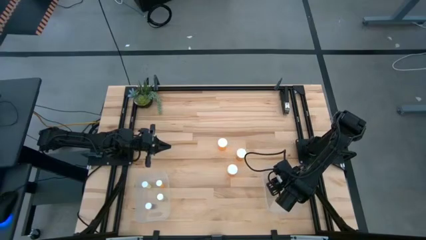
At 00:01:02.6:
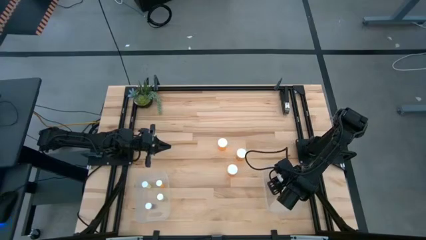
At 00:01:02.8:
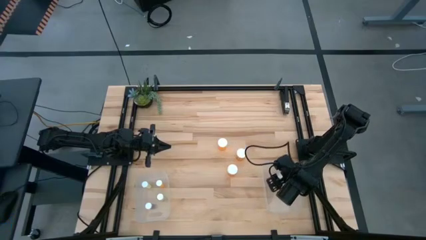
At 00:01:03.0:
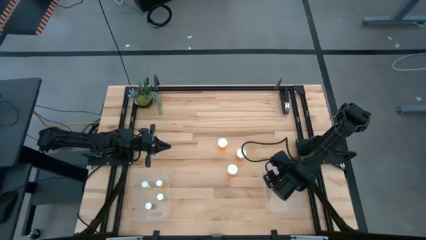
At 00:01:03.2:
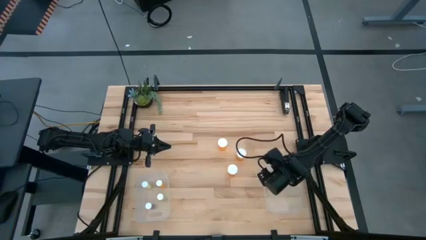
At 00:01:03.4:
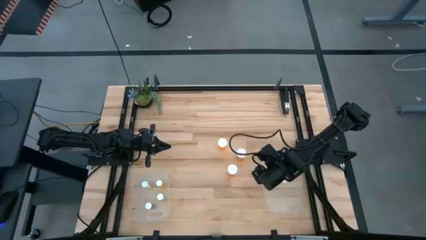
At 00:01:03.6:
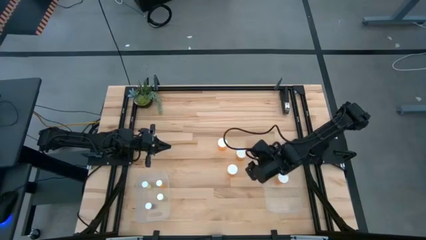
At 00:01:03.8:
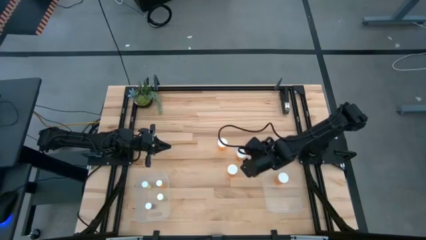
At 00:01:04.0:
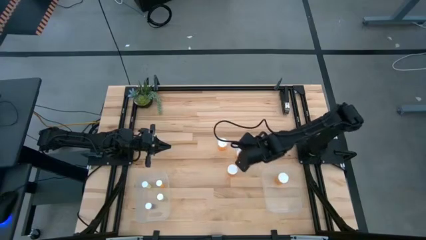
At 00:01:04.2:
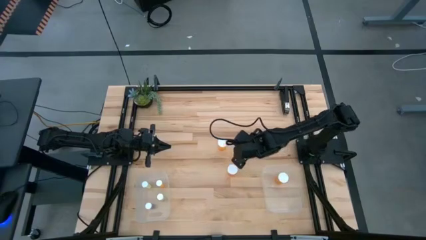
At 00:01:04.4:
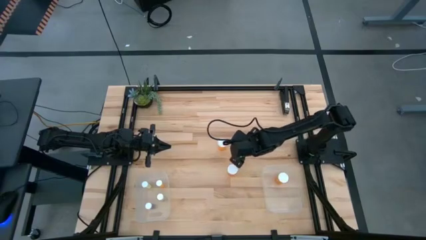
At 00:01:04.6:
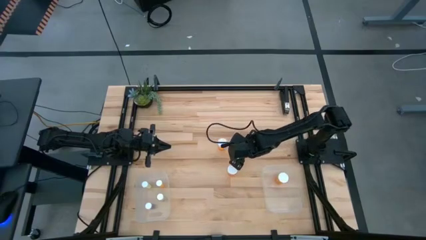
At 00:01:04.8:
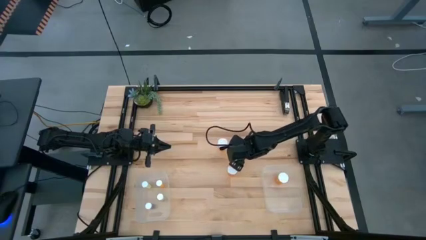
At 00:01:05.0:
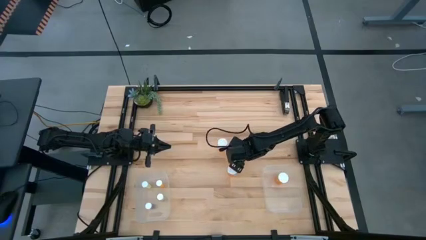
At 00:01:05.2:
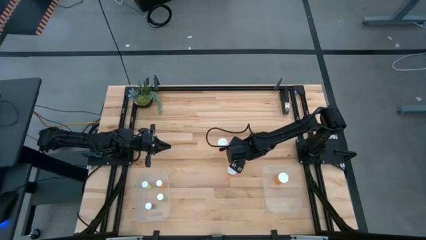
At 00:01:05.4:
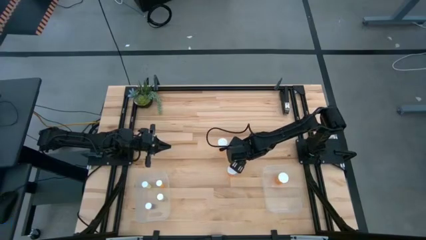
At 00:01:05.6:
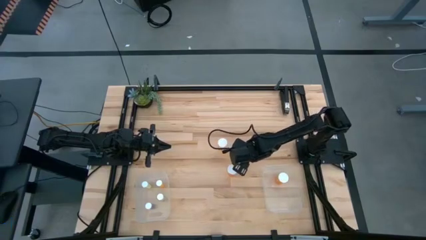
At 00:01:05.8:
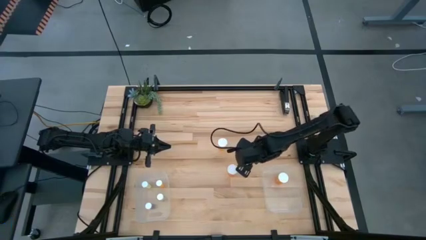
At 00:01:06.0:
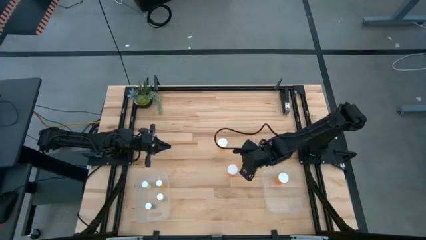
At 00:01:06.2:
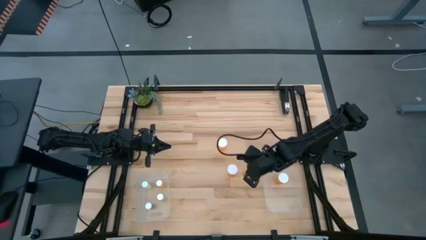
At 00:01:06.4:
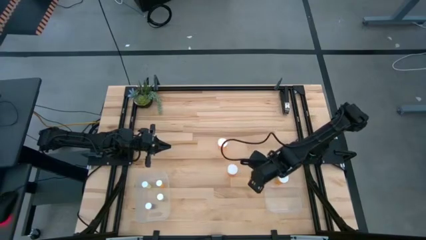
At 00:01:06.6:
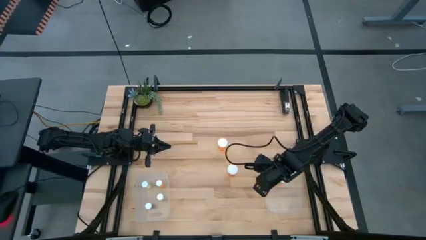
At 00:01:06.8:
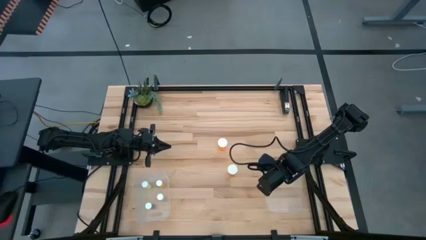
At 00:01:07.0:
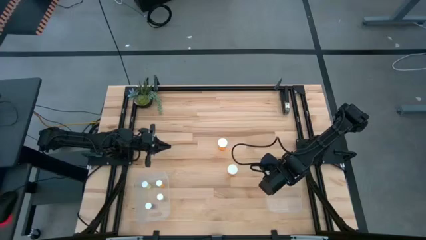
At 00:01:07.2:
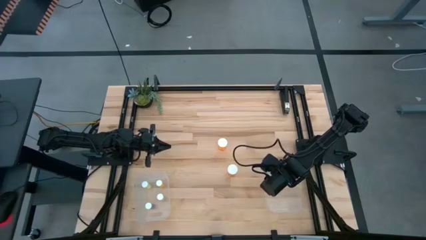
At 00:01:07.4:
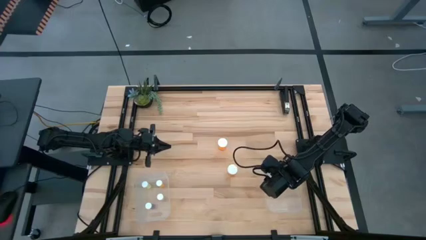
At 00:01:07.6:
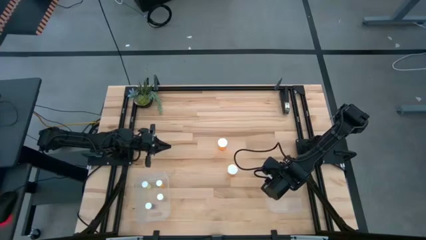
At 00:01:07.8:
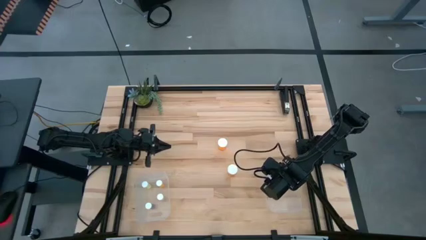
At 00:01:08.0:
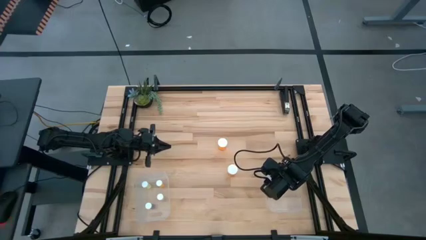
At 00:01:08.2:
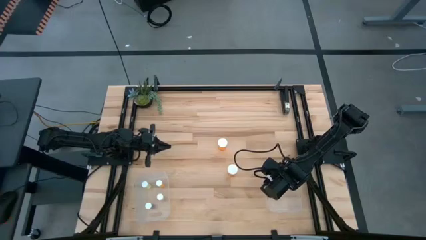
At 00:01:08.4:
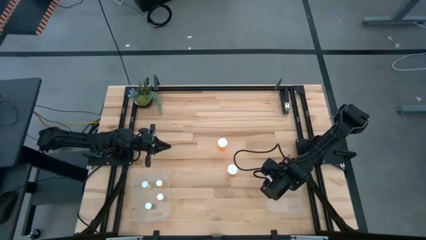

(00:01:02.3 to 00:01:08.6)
Task: Pick and place medicine bottles into bin by pill shape (circle, oval)
Put the big orange pill bottle into the right transparent bin

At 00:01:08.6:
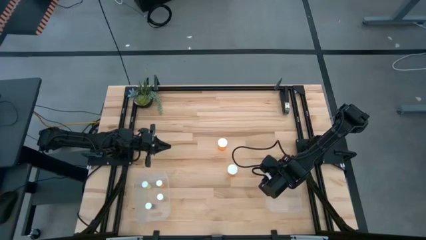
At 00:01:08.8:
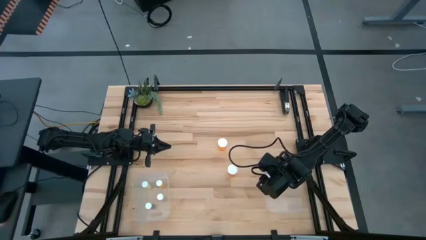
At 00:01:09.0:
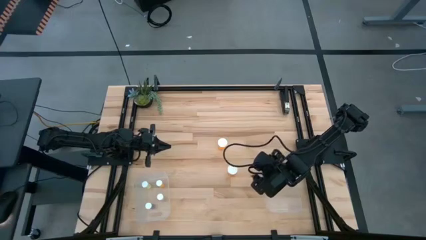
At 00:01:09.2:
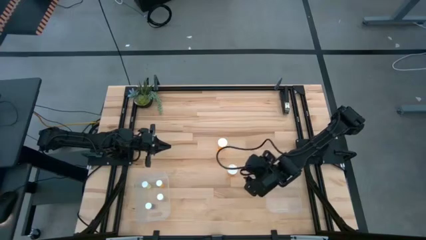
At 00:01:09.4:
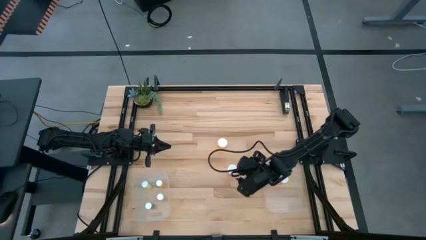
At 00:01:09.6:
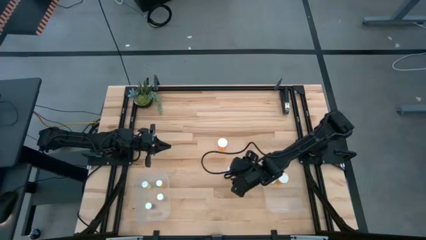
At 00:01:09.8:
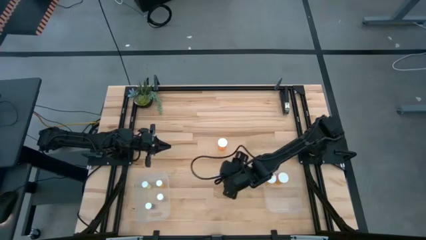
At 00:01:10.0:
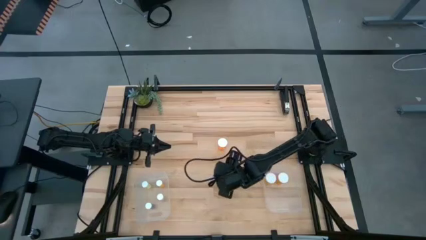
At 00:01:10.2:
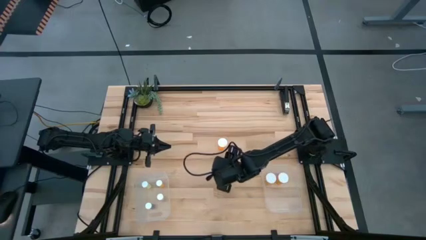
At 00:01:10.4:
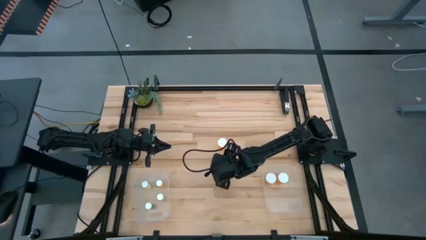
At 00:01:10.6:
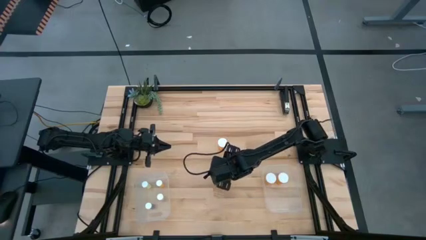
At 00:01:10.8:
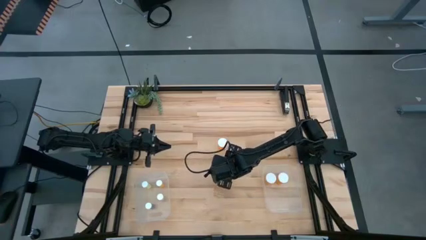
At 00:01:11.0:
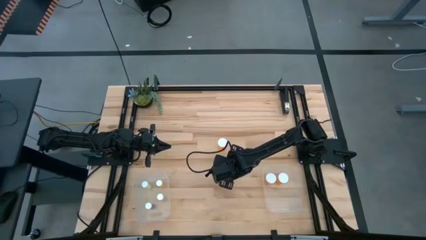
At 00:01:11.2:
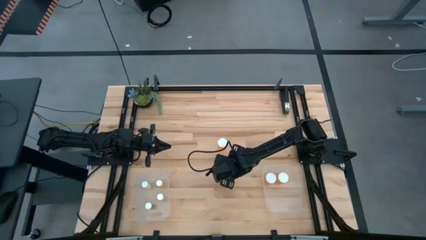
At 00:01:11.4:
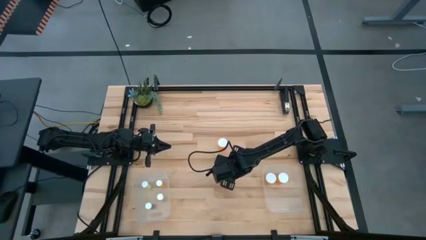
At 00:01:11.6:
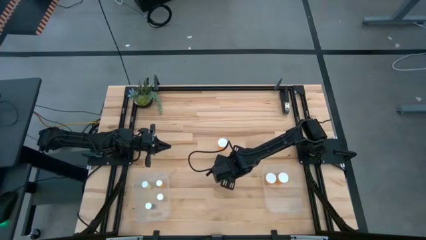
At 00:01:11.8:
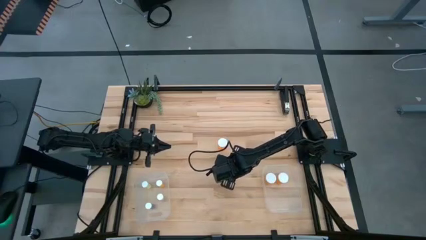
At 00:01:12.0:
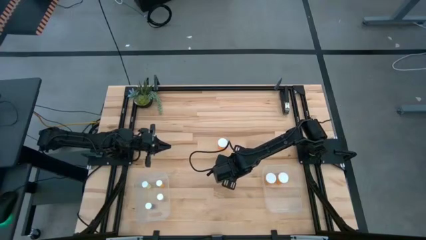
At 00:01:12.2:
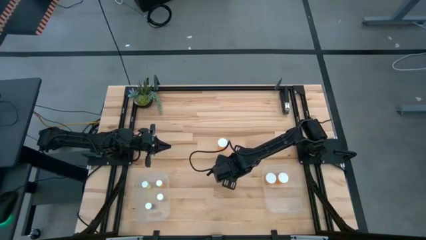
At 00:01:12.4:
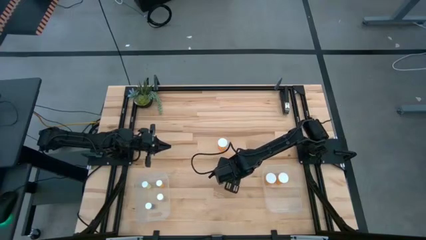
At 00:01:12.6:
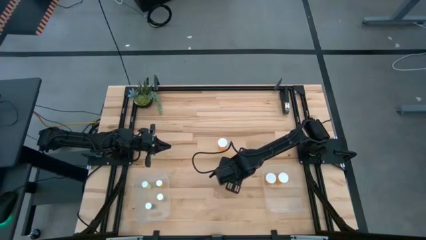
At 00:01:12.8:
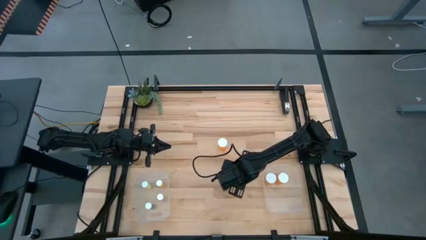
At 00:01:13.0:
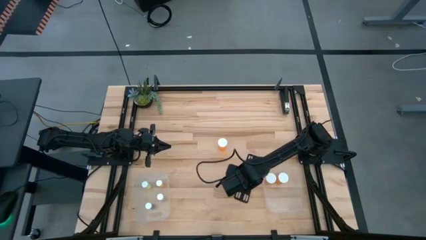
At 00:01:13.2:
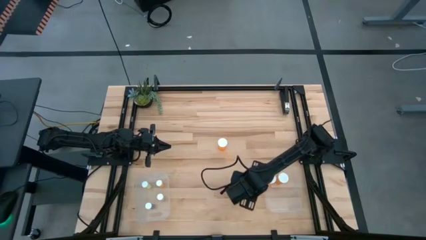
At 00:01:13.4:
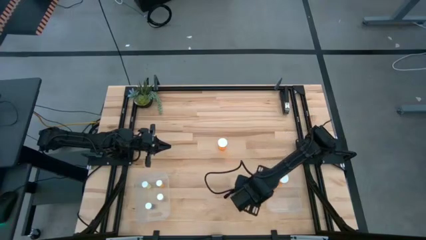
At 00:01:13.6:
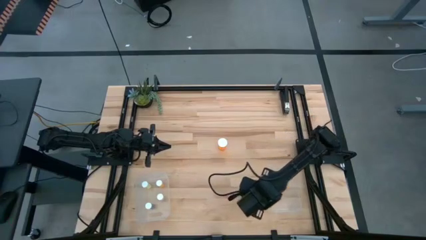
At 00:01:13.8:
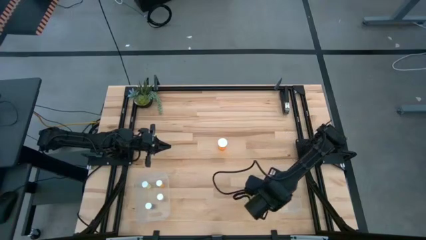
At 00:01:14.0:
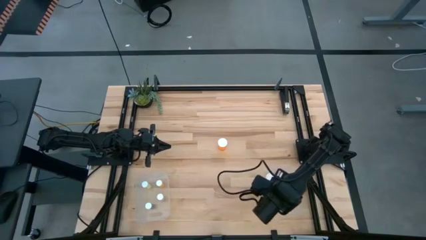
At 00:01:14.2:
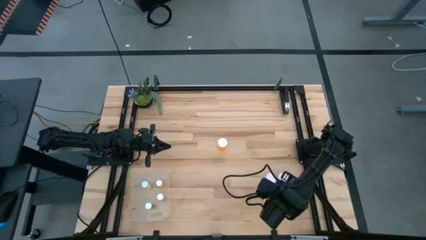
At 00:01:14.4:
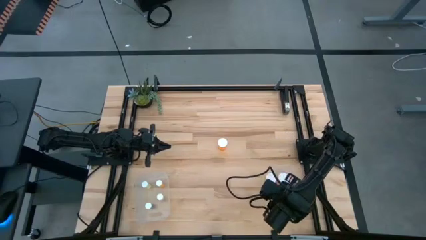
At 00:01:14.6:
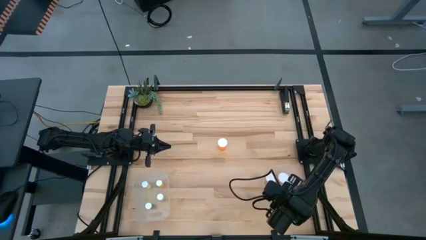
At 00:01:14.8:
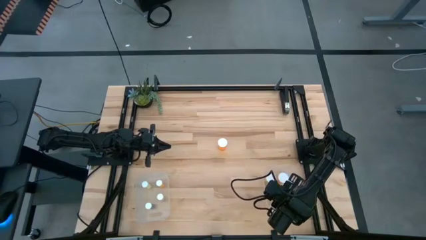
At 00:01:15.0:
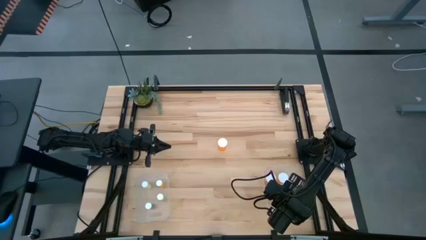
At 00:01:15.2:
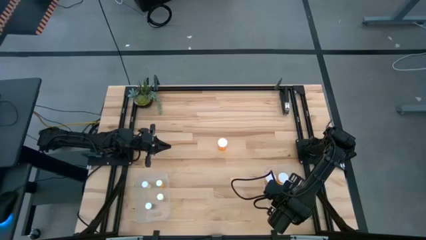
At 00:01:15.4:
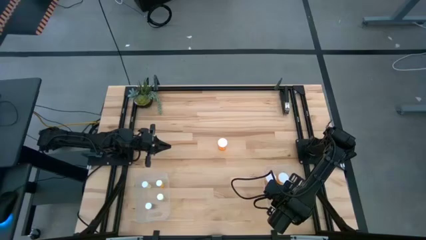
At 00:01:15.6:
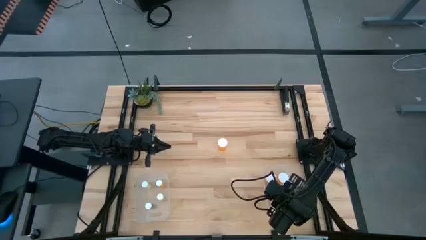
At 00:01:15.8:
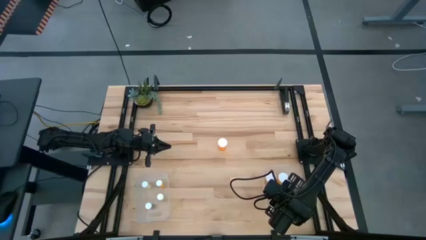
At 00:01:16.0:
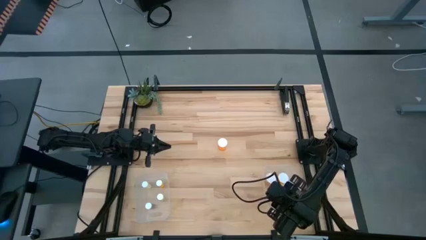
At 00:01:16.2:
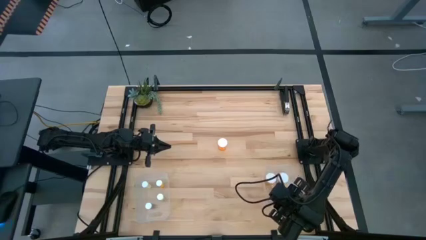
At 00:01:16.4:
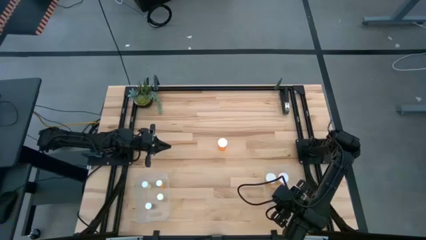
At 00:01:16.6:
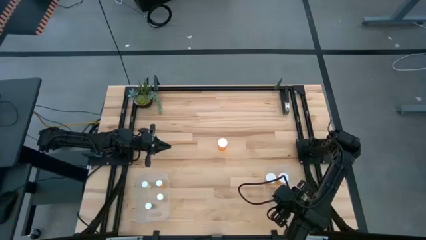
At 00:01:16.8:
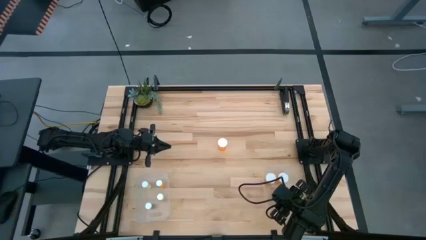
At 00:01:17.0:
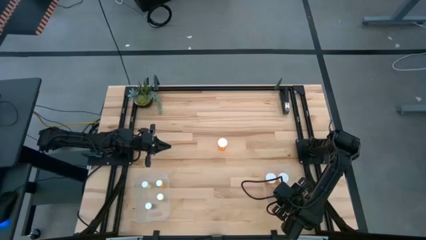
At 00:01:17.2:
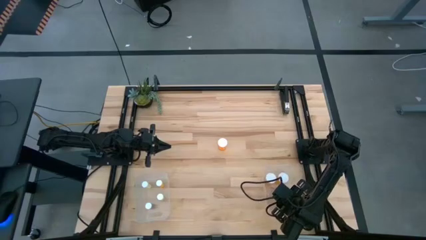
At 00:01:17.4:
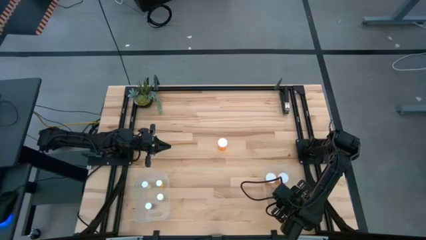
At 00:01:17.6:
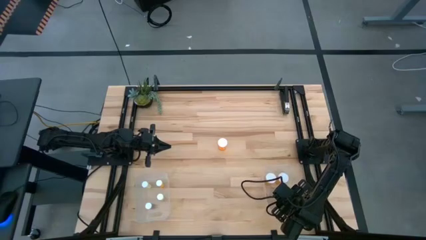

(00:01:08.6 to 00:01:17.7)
Put the big orange pill bottle into the right transparent bin
